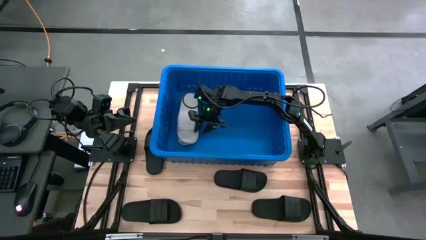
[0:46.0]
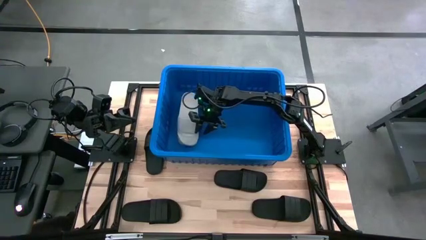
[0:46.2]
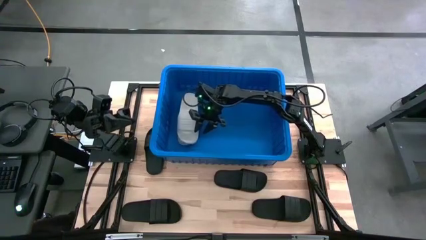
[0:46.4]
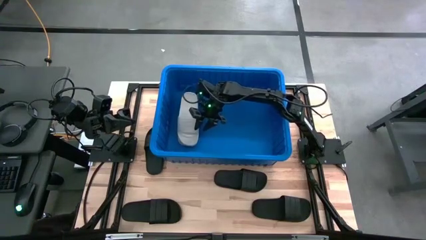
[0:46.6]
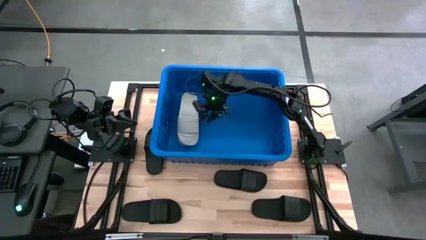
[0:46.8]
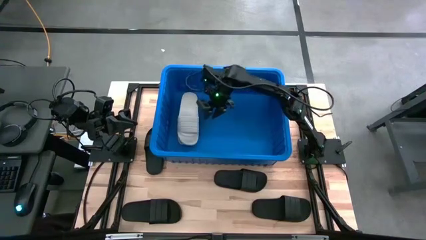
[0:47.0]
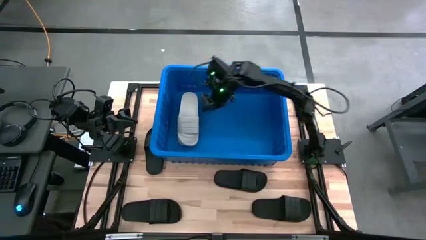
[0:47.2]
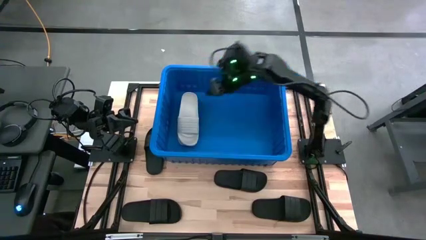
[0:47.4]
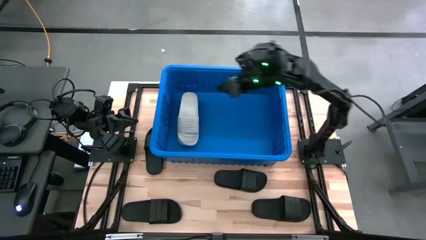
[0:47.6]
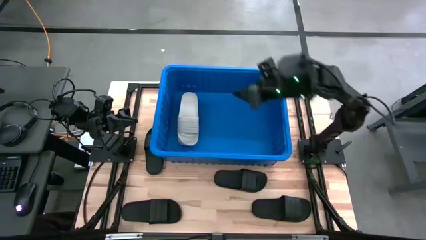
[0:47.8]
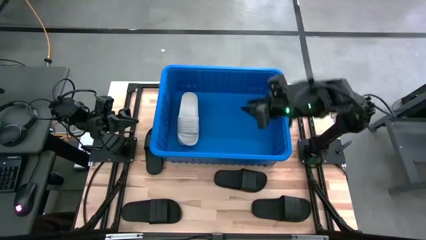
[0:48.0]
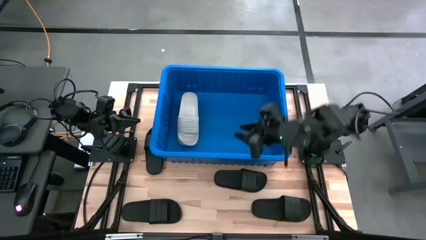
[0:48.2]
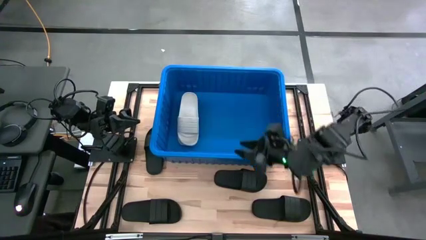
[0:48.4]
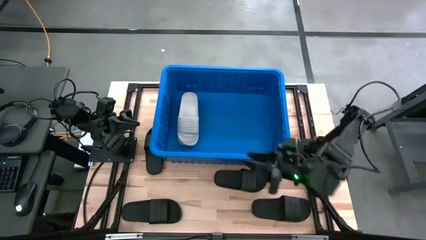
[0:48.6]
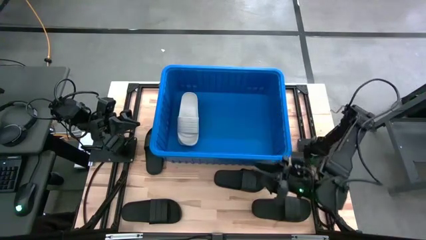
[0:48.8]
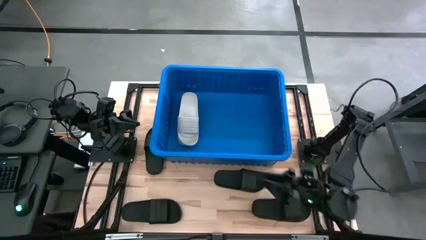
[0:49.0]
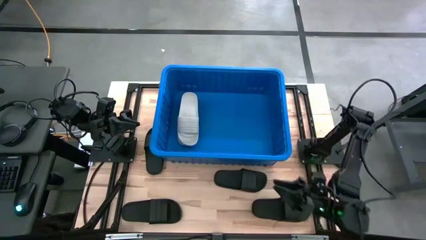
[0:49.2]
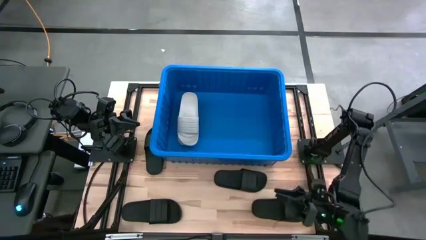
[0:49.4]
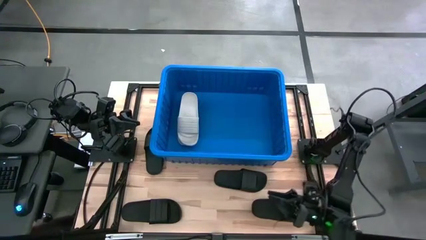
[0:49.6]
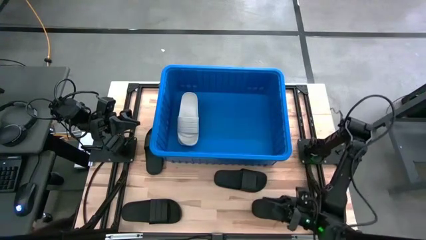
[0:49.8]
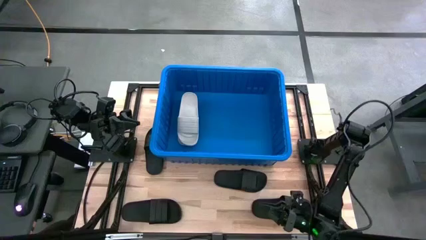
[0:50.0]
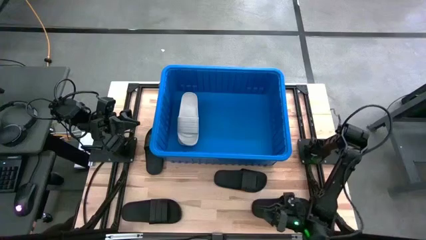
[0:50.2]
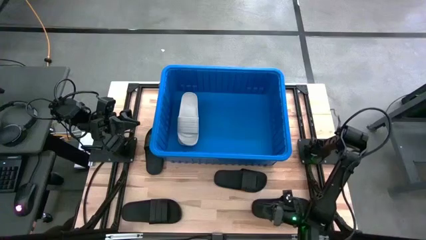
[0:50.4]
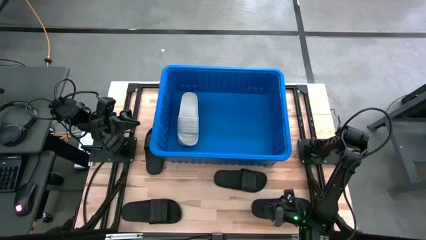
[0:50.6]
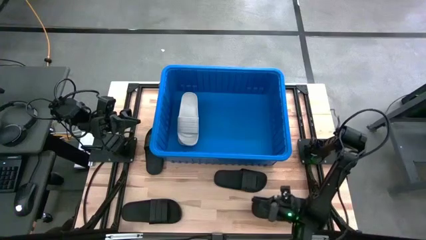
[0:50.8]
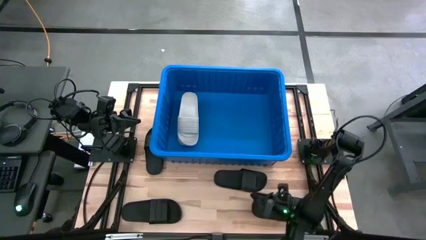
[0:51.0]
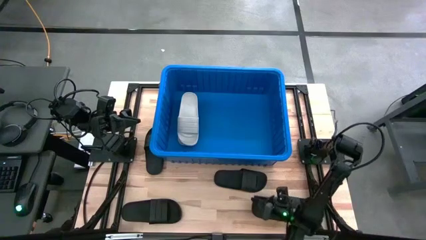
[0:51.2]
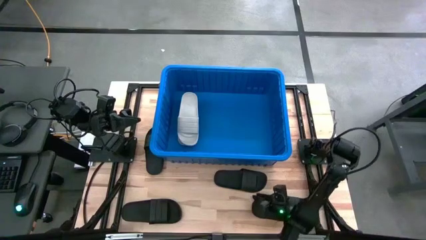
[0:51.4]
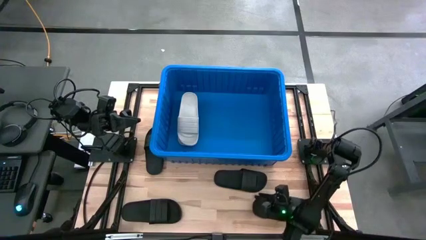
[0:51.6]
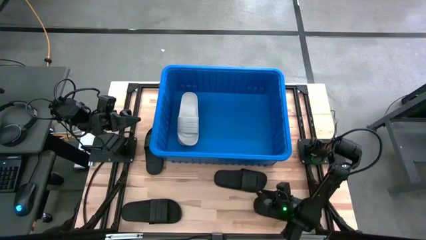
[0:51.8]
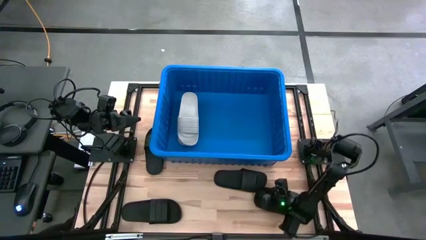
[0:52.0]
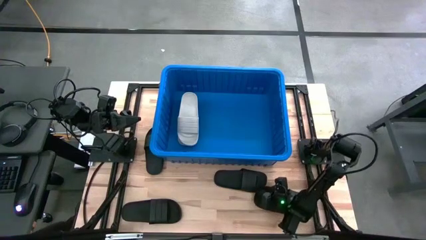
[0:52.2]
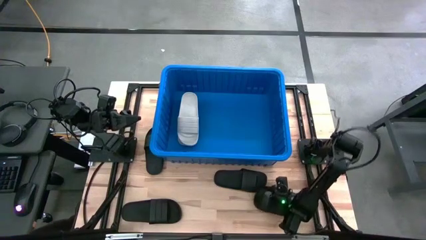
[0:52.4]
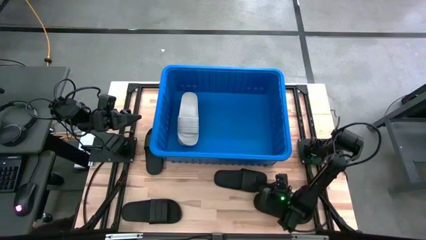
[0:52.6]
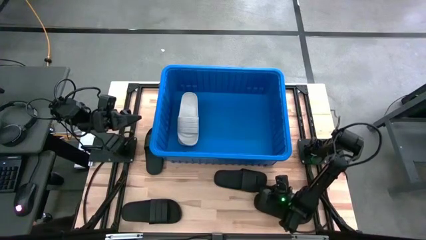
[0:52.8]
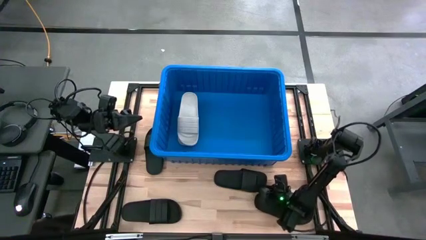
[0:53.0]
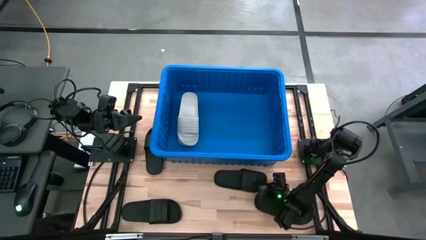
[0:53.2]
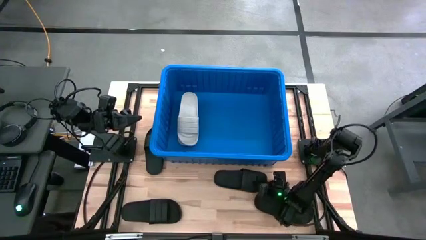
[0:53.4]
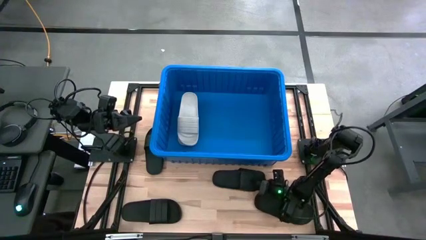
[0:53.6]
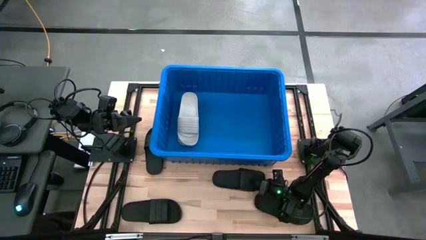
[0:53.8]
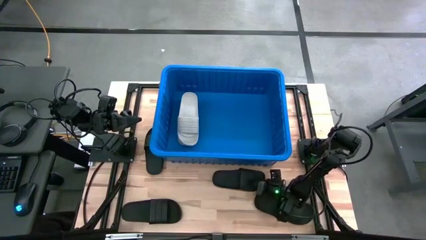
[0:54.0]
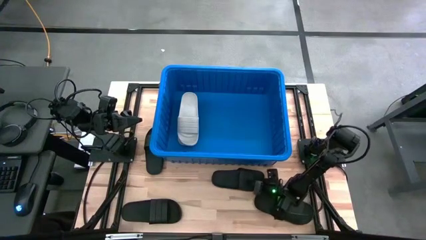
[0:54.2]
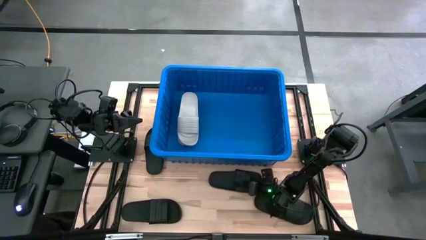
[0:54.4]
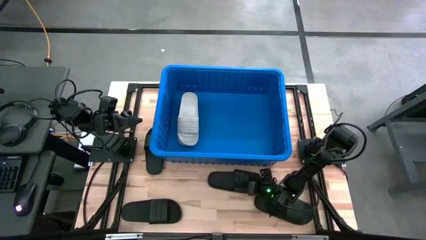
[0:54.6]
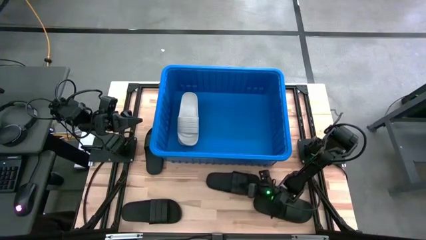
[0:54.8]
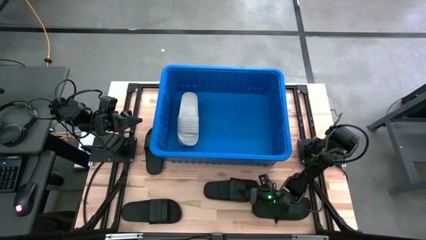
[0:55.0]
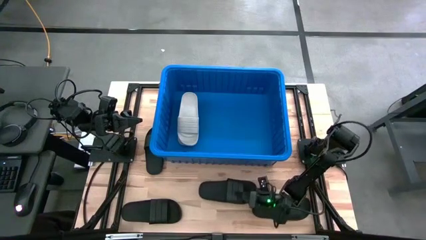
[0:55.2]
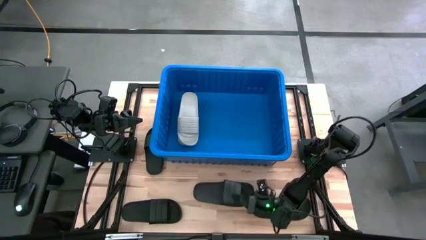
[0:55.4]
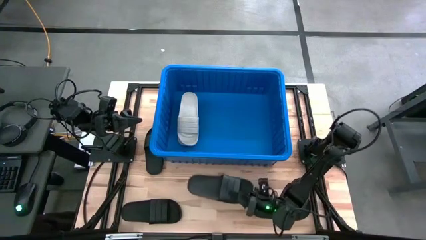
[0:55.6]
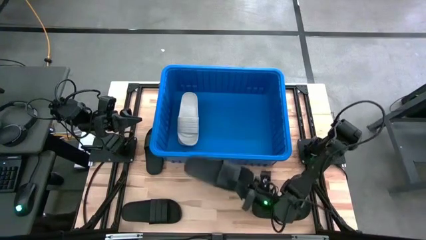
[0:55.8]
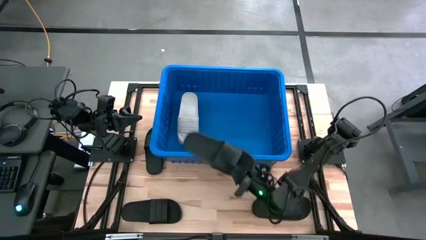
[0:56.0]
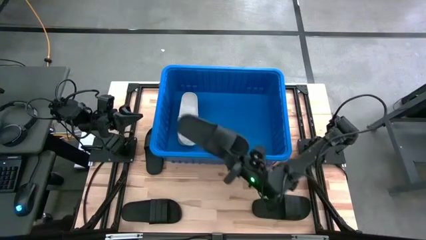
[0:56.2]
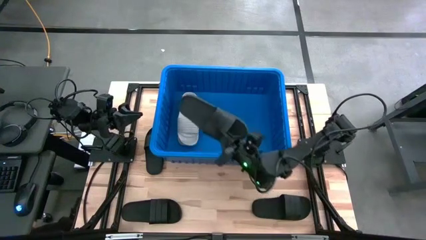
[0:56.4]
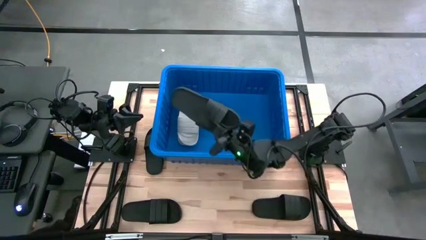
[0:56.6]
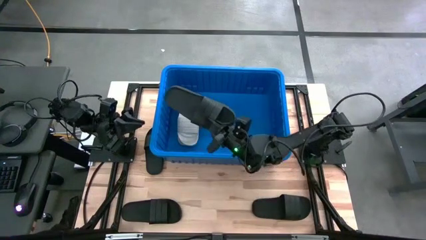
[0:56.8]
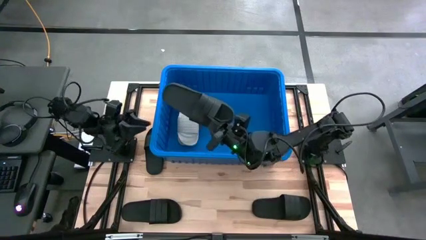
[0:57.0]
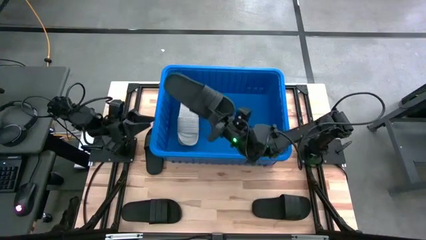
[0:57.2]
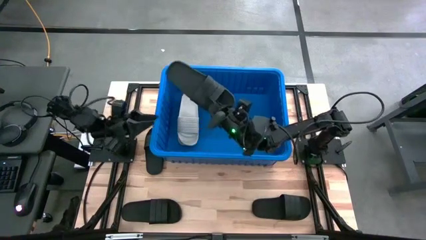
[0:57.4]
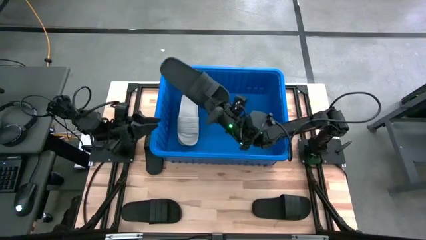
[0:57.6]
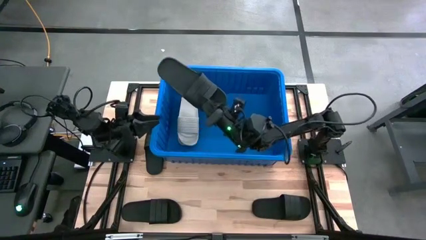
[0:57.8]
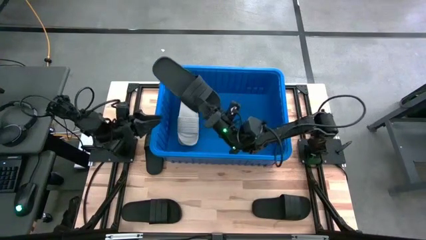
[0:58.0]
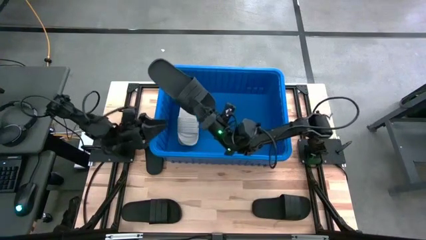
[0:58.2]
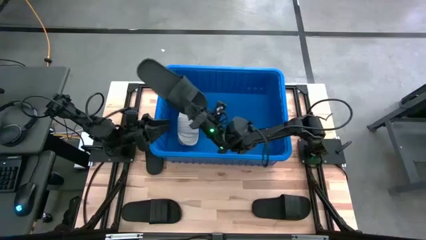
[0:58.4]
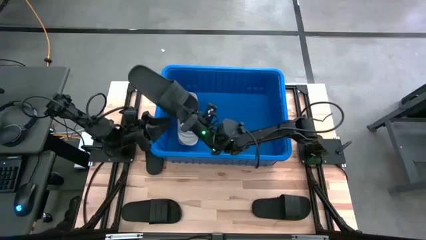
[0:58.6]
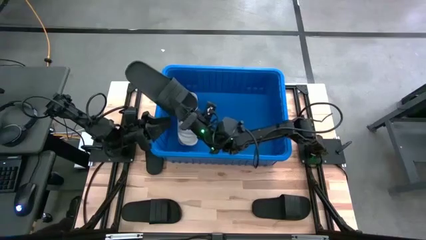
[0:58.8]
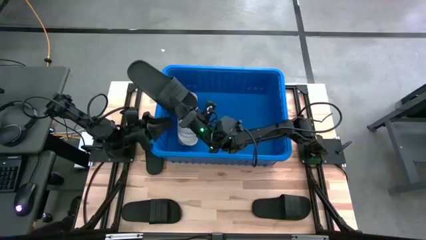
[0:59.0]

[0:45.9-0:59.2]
Task: Pick and place slides into bin
Put the black slide into the blue bin

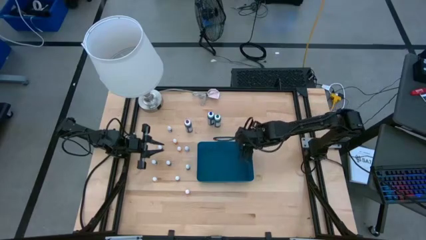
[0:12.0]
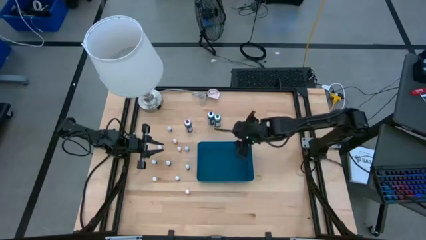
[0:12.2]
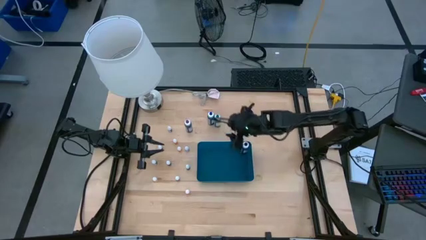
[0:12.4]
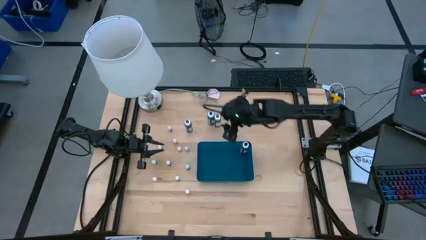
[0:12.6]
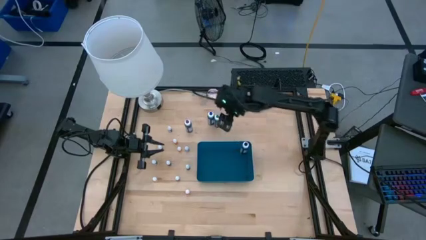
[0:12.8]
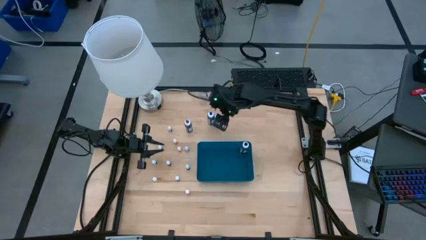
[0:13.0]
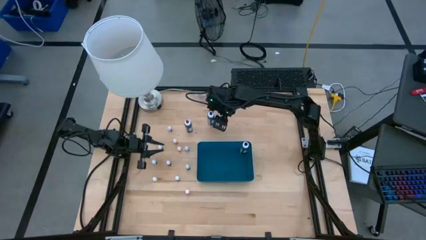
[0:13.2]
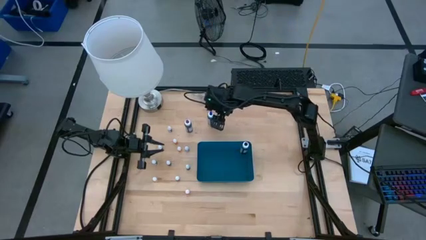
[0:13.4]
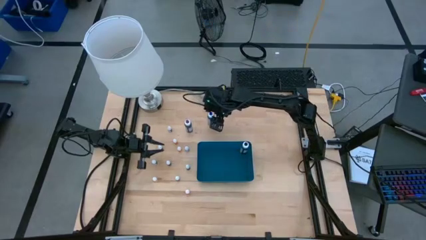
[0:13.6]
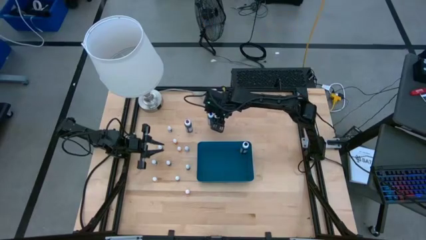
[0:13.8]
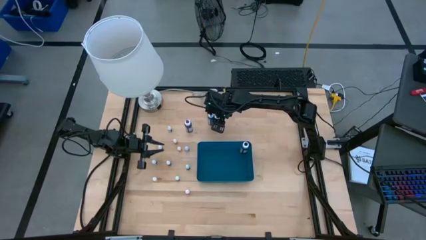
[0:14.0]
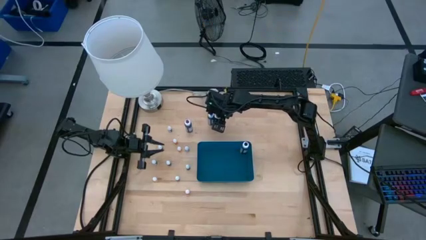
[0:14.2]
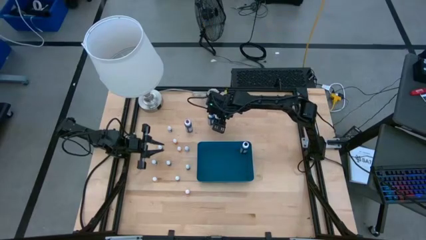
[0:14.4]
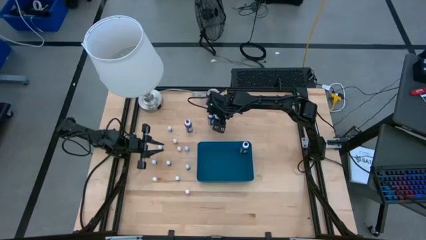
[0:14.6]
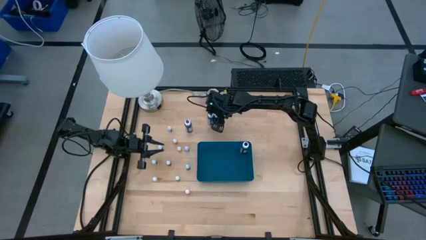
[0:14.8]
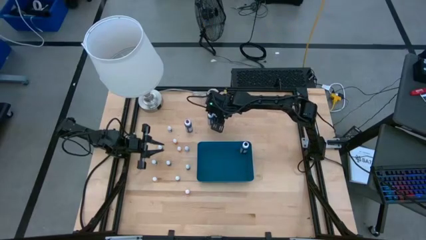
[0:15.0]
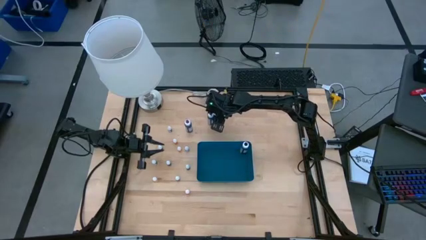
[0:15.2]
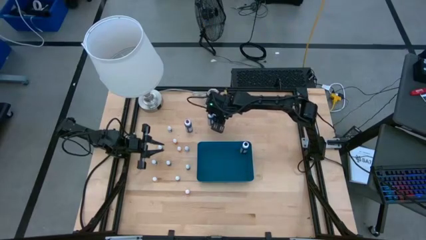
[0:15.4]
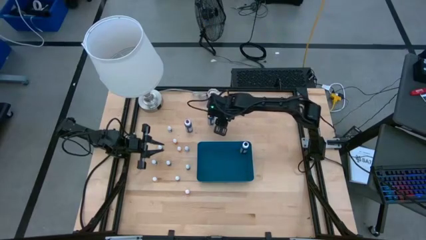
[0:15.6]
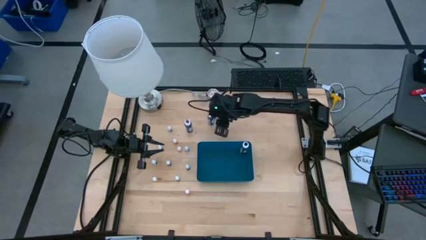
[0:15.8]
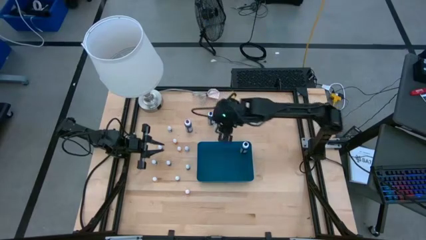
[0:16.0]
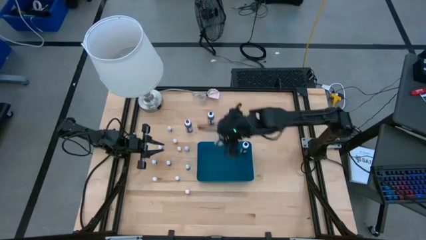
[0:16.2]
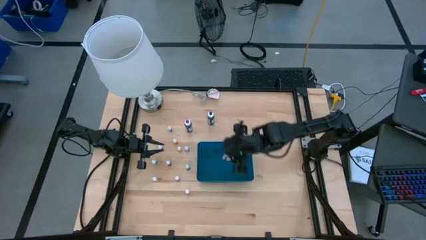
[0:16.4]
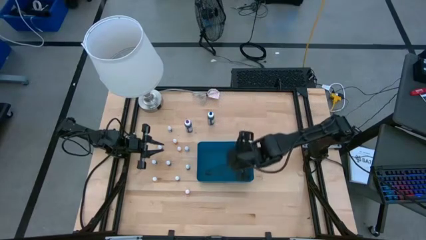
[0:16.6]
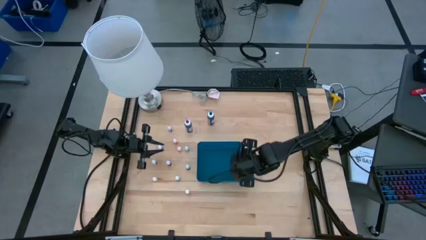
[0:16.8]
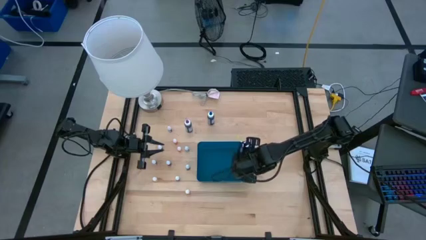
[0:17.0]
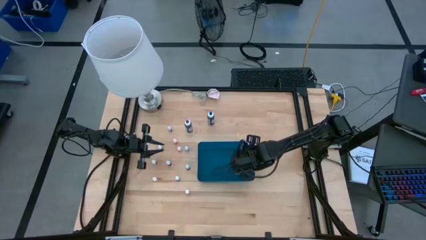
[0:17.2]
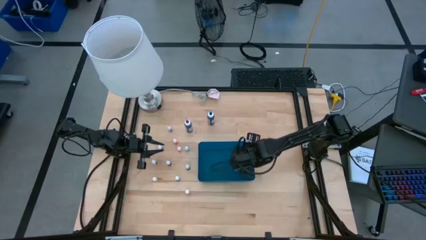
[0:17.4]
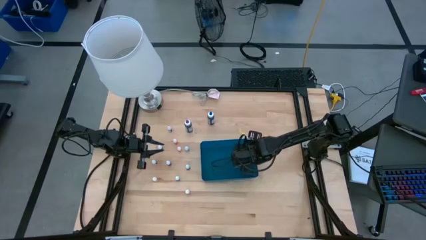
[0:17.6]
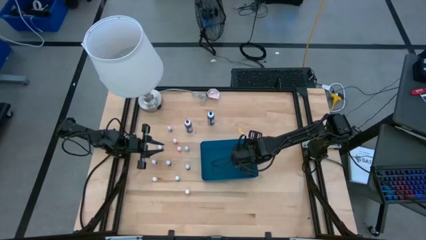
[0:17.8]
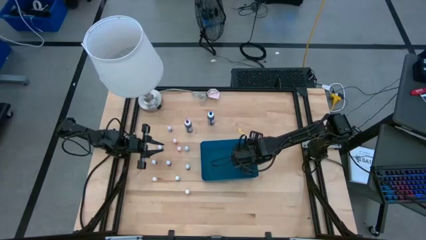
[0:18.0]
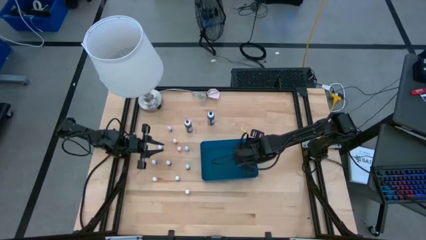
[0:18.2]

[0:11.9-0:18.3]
Task: Pick & Place food coloring
Put the large green food coloring bottle into the blue bin
